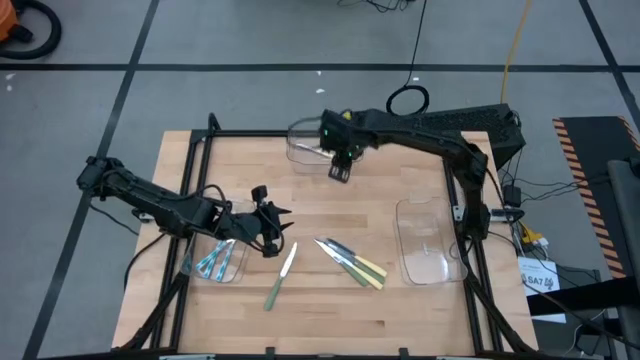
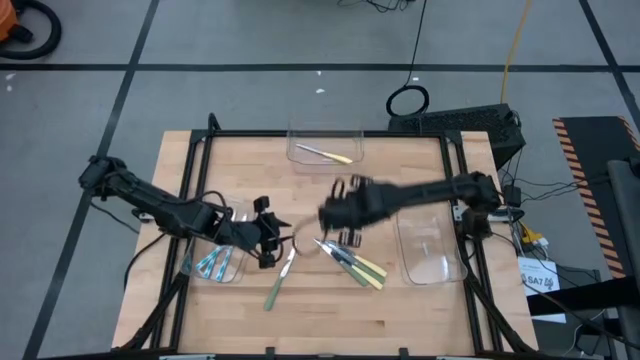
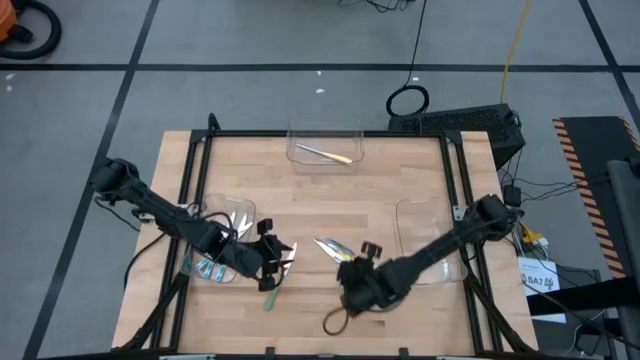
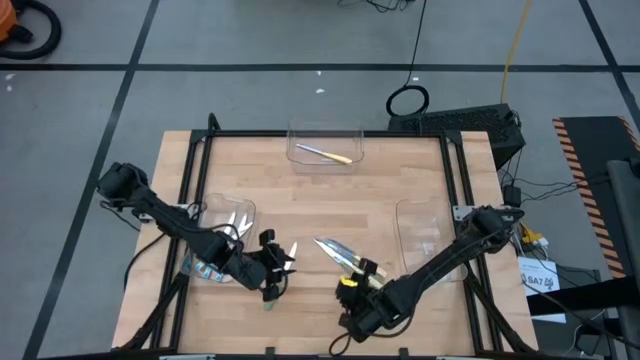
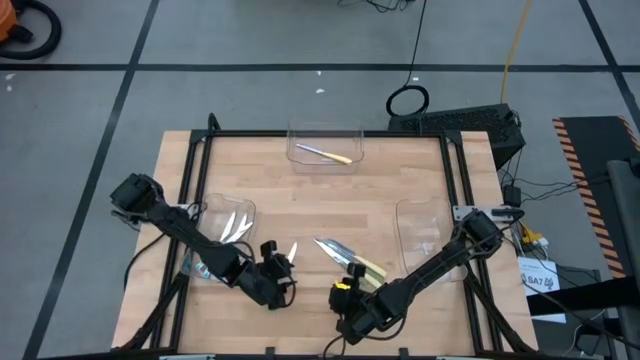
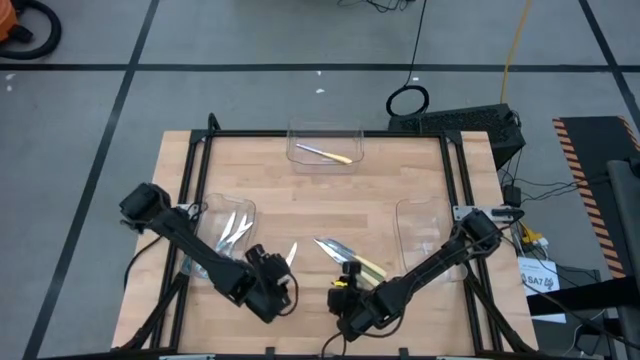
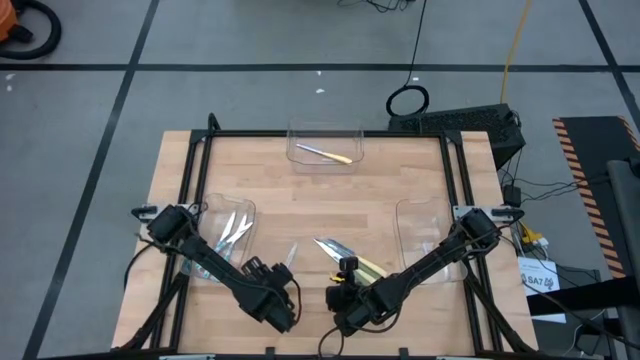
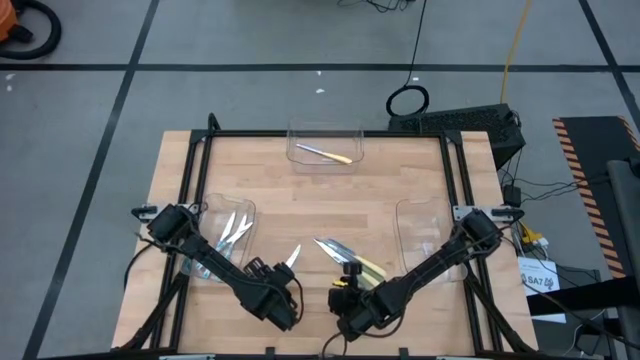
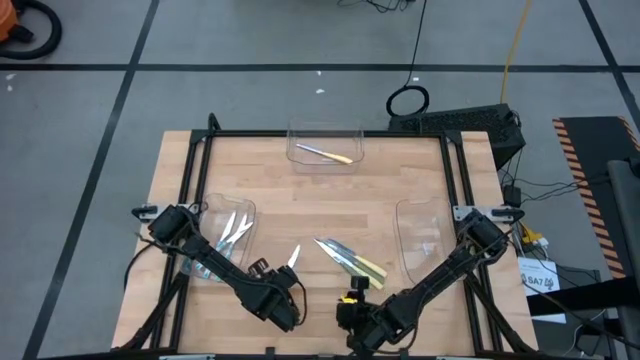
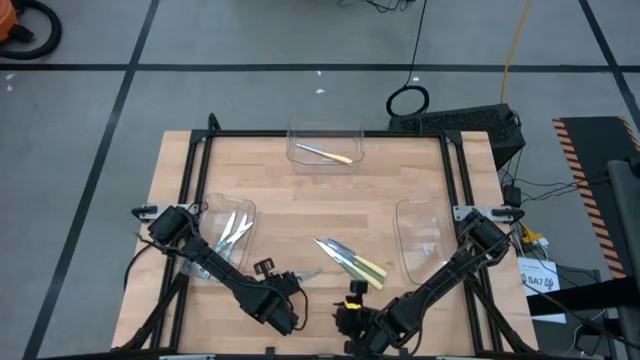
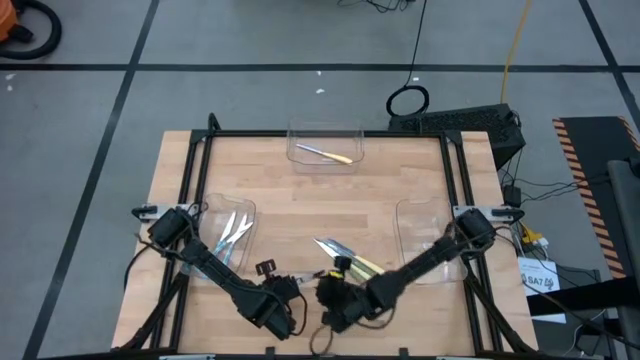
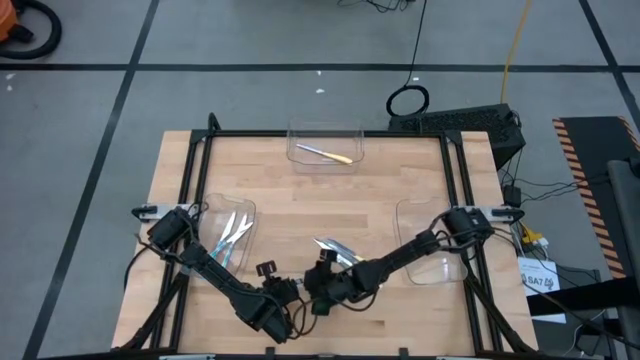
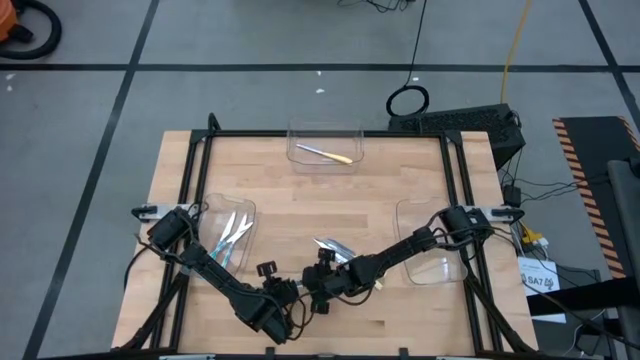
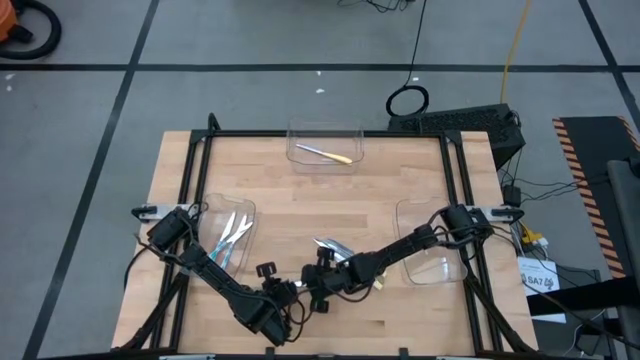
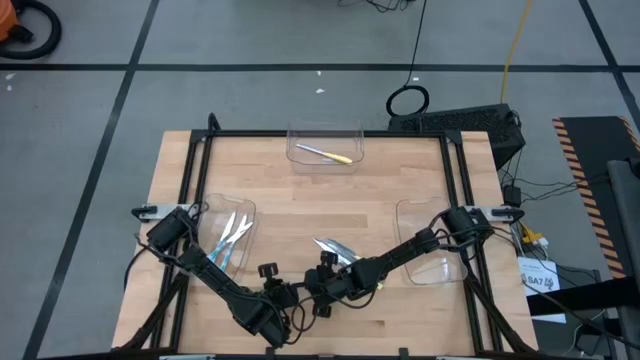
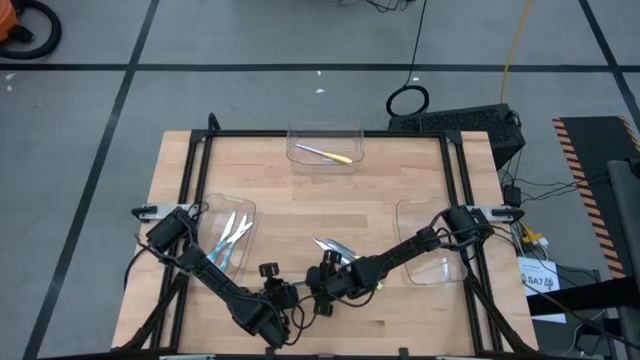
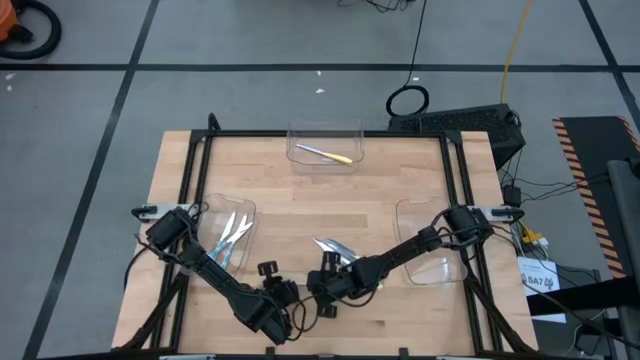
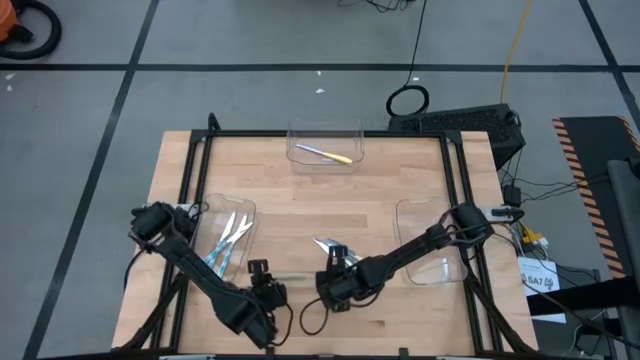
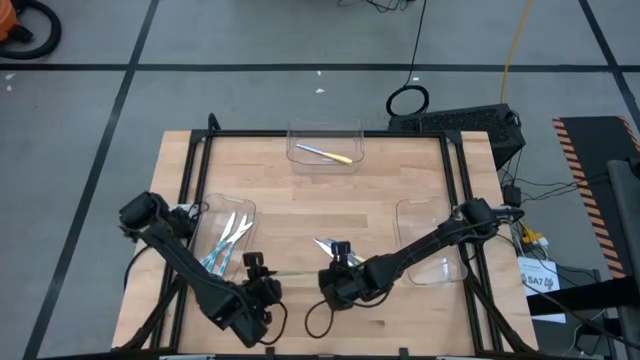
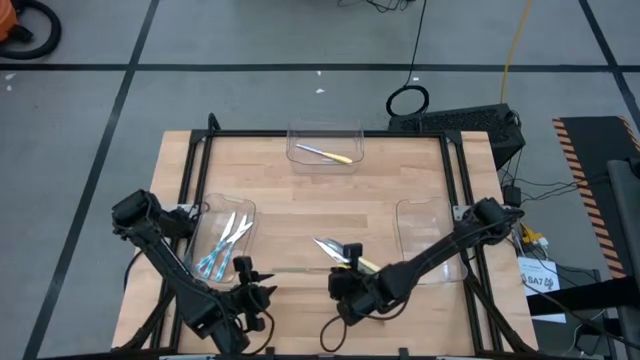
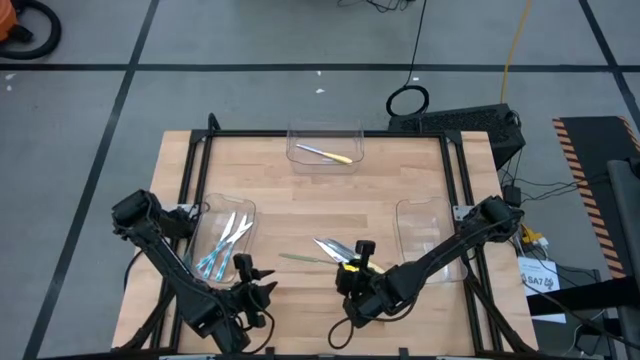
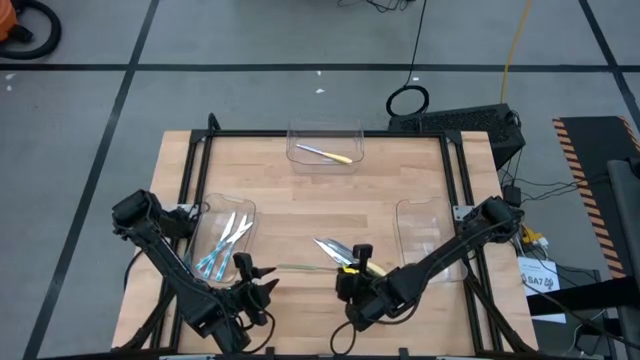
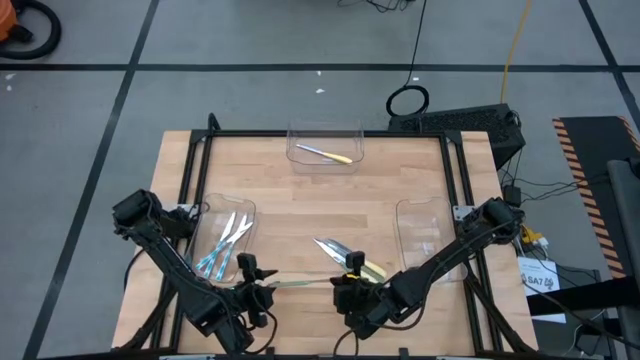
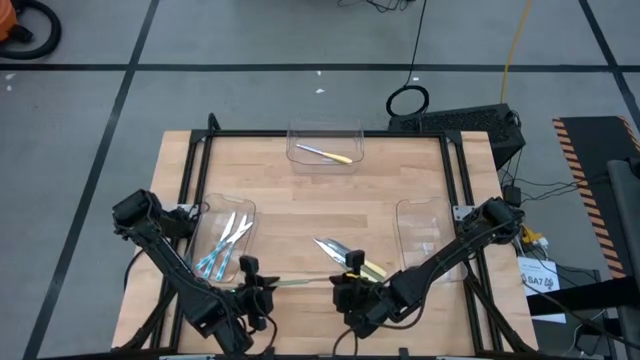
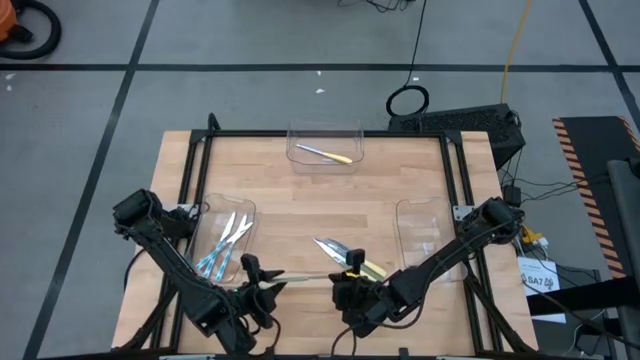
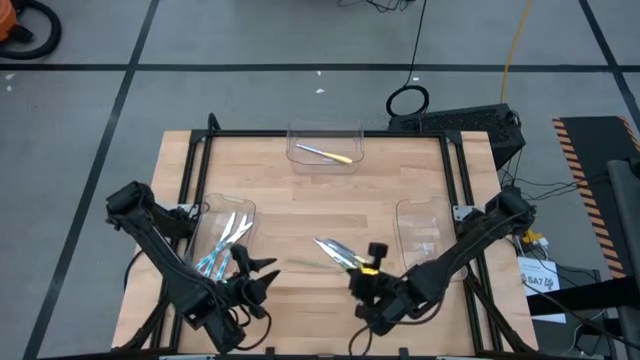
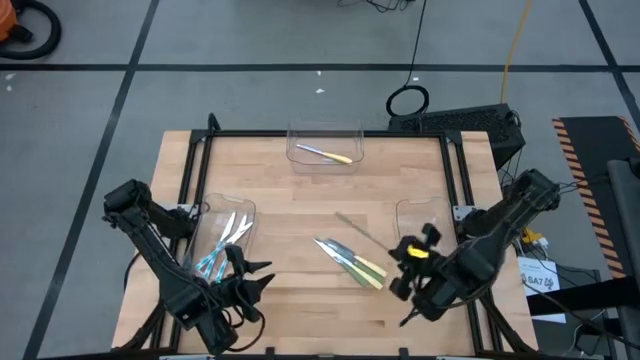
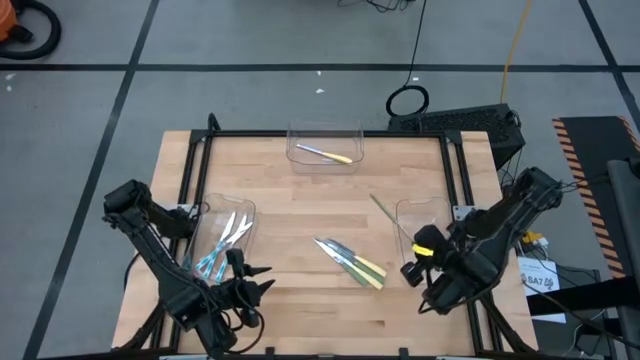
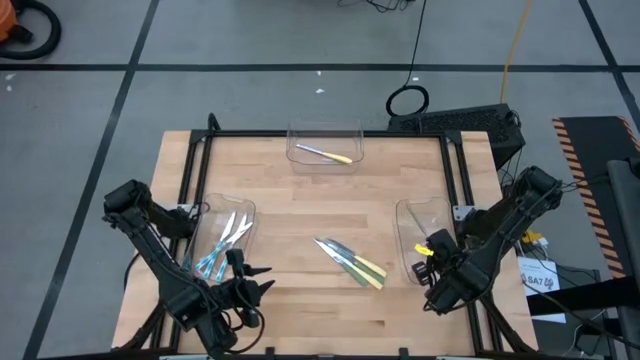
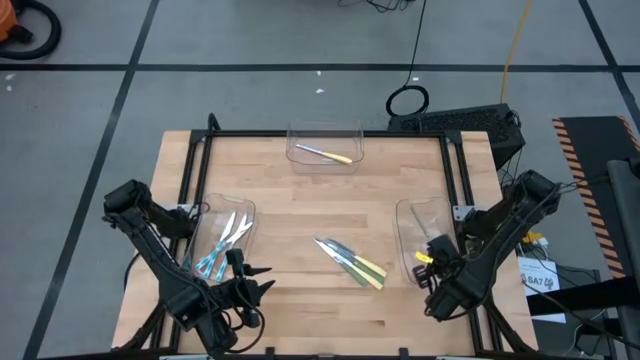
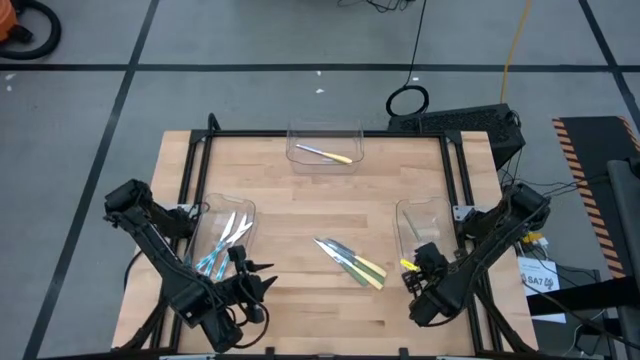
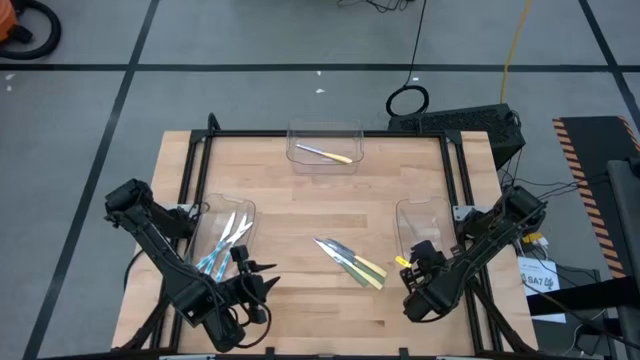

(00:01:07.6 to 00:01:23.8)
Task: Sort silverware by color (type)
Put the left green knife into the bottom right transparent bin

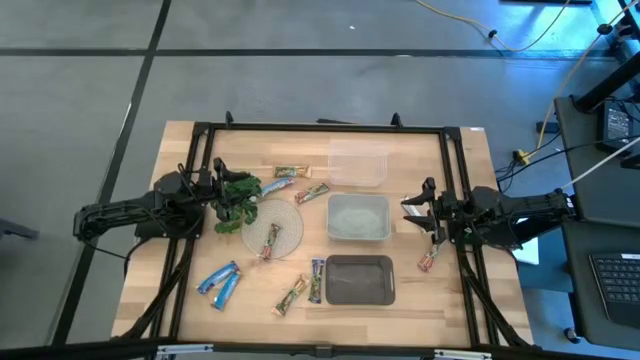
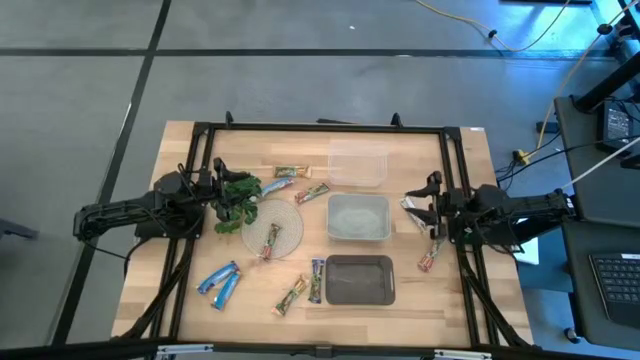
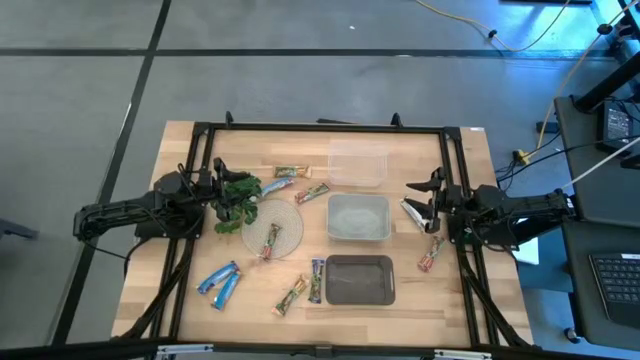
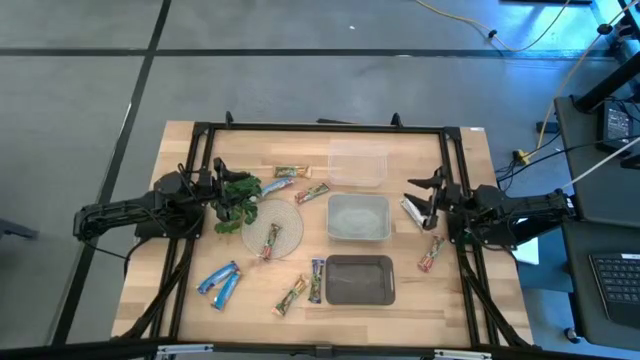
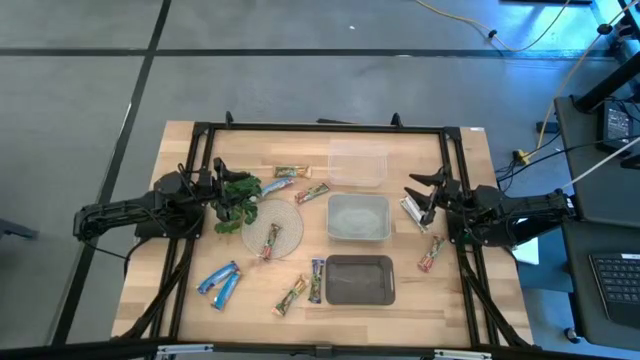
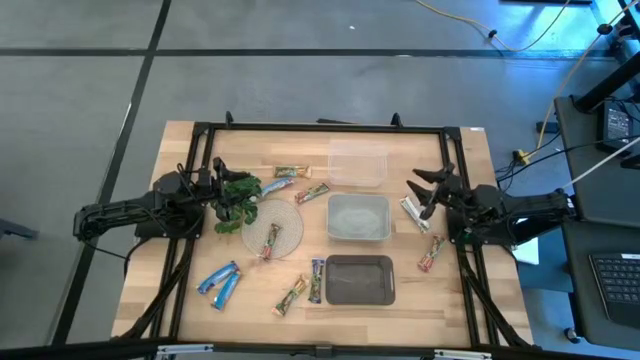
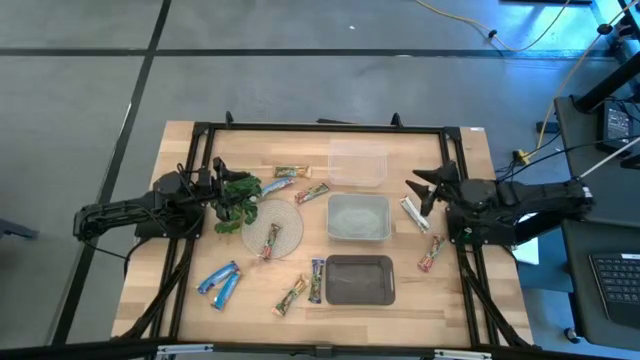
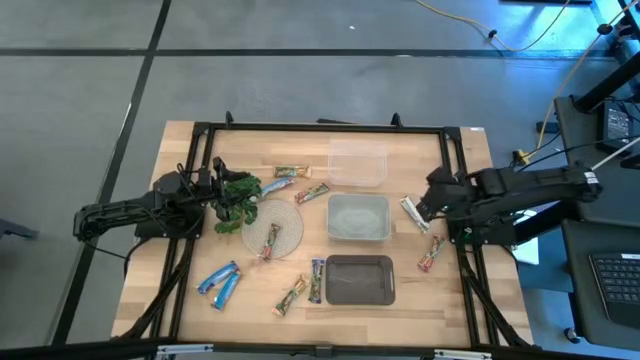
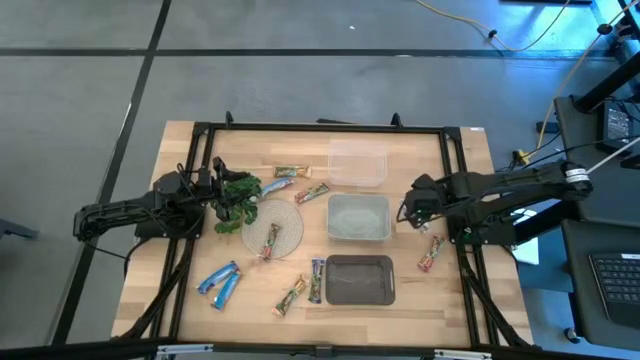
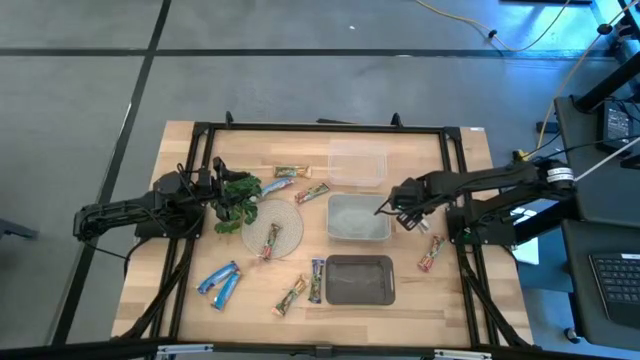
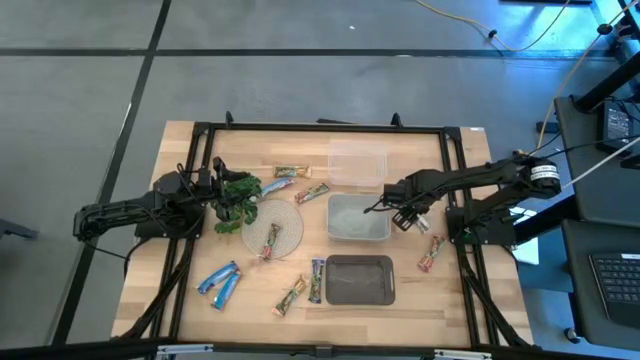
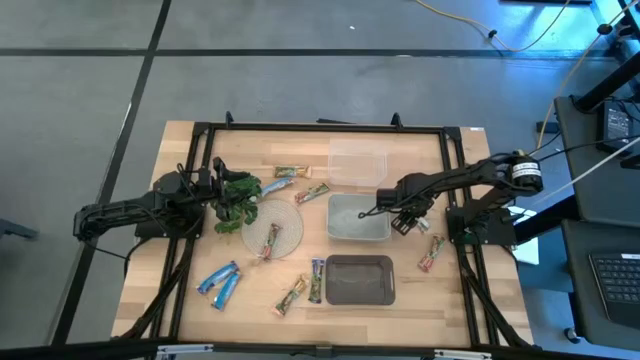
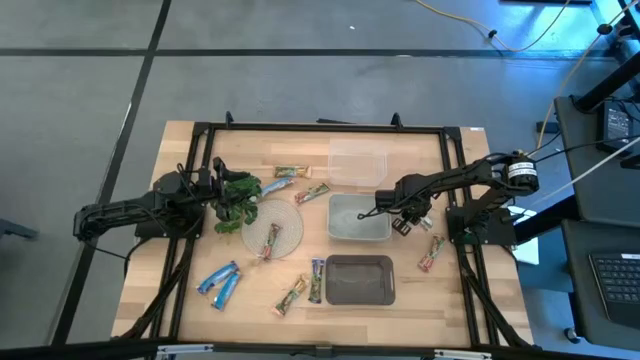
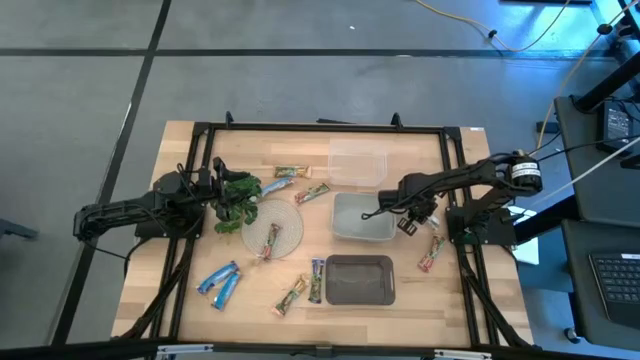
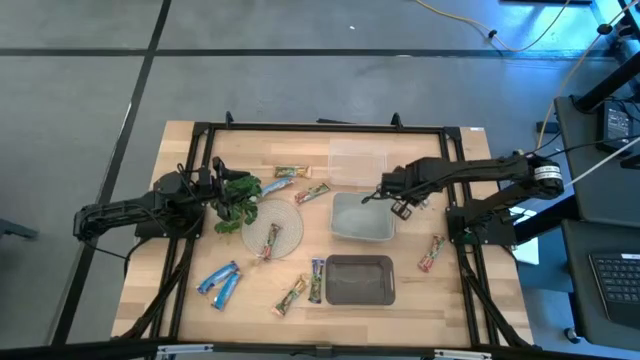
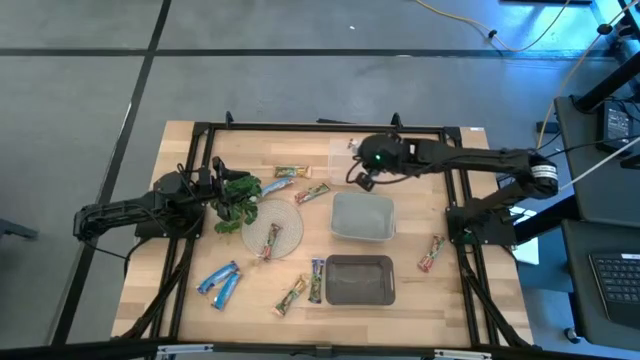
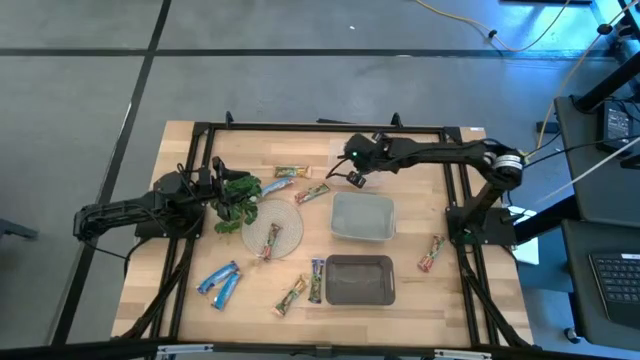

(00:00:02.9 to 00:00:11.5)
Task: Pick and place Granola Bars by type
Put the yellow granola bar into the transparent bin
